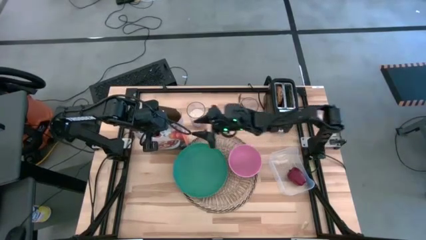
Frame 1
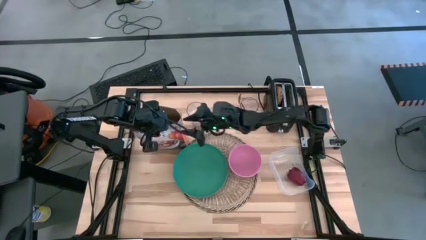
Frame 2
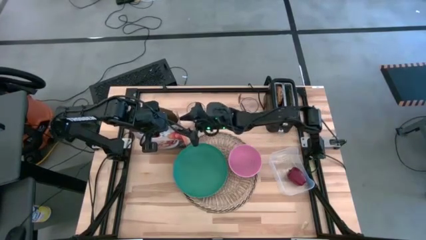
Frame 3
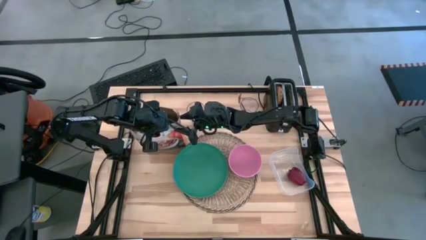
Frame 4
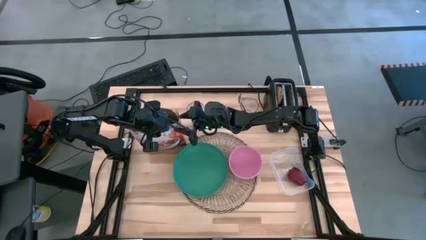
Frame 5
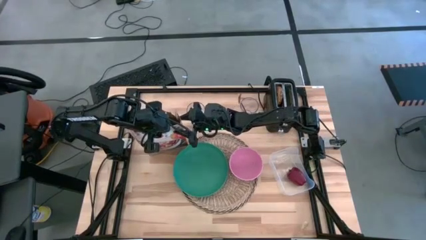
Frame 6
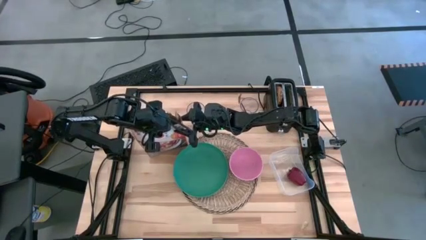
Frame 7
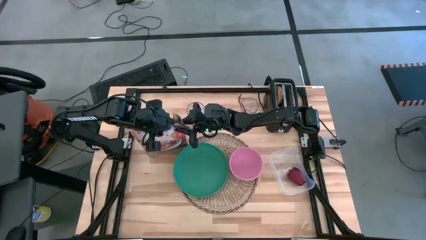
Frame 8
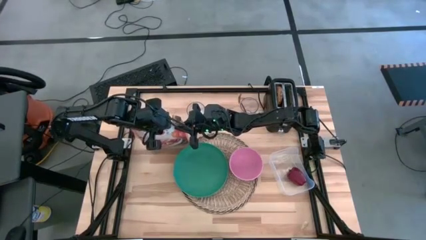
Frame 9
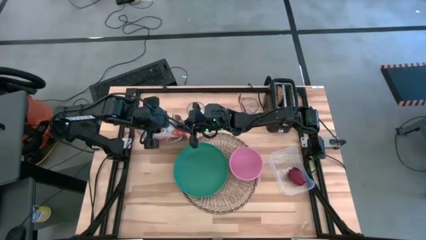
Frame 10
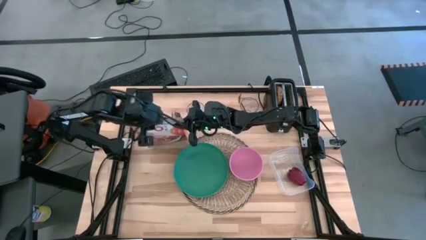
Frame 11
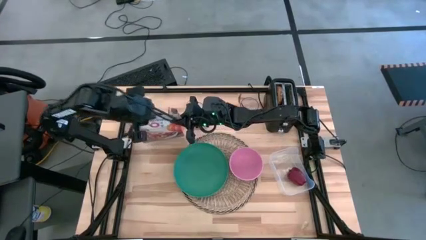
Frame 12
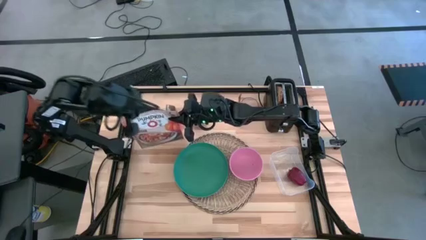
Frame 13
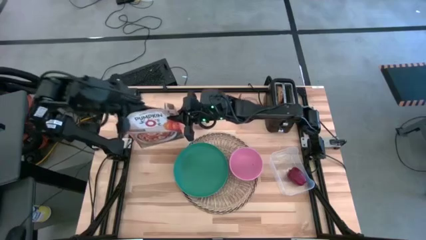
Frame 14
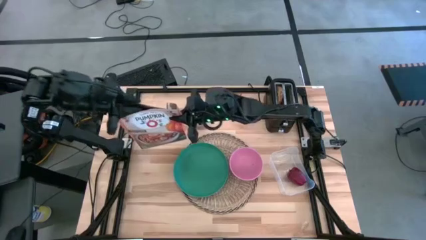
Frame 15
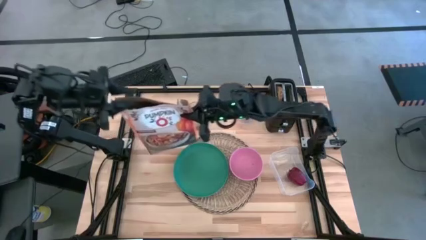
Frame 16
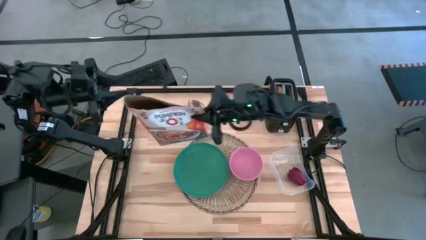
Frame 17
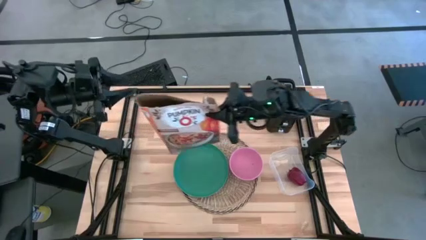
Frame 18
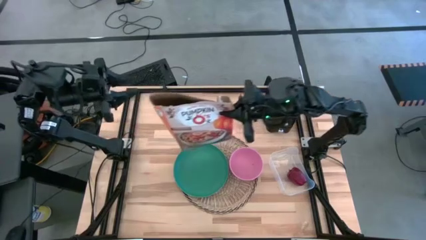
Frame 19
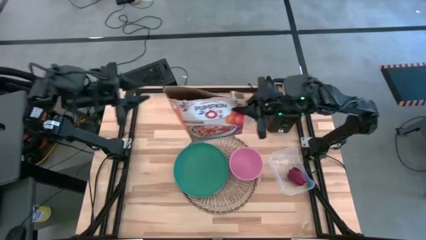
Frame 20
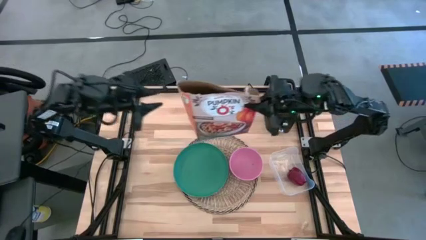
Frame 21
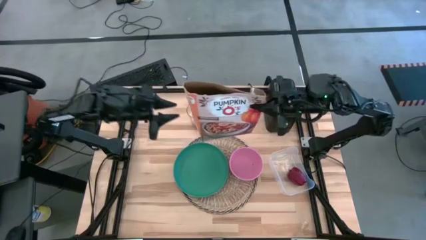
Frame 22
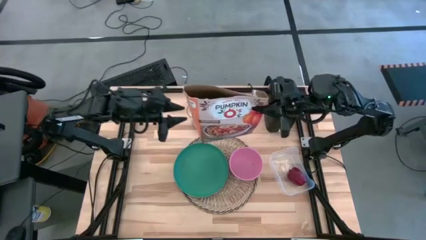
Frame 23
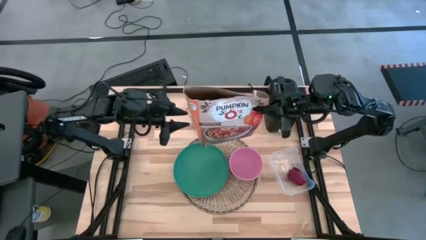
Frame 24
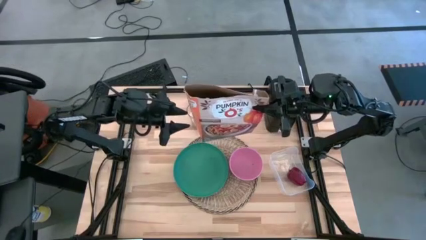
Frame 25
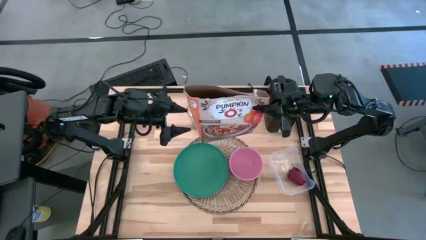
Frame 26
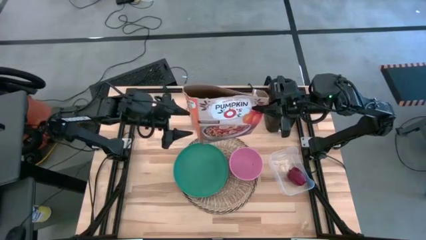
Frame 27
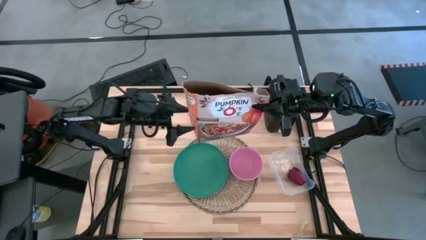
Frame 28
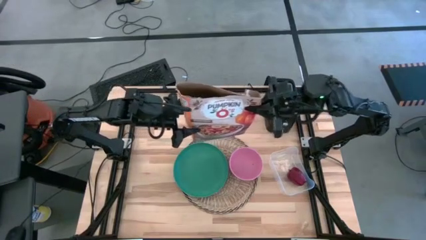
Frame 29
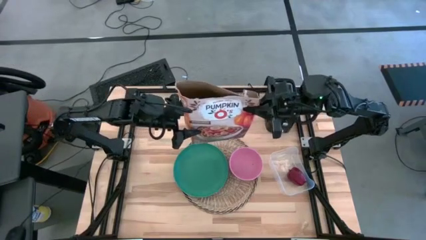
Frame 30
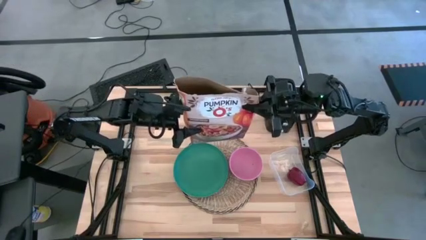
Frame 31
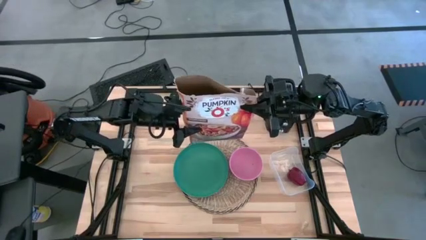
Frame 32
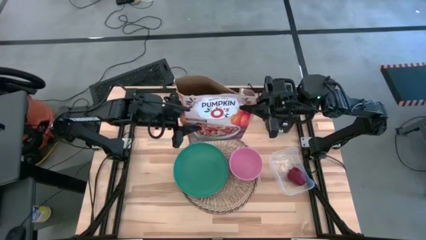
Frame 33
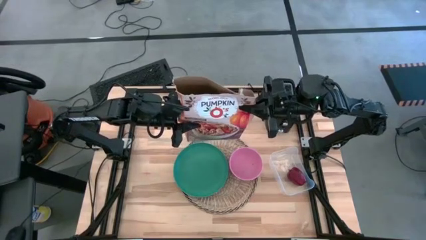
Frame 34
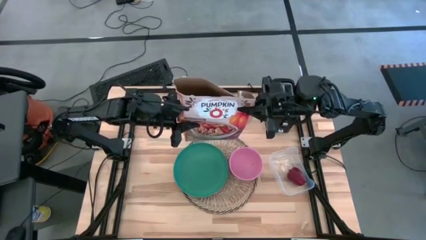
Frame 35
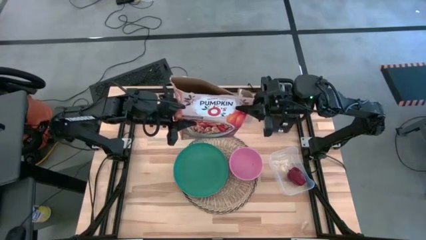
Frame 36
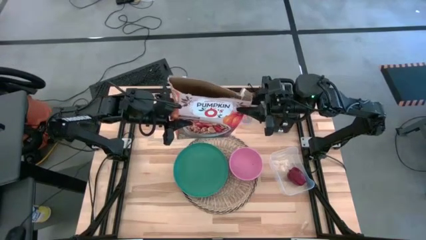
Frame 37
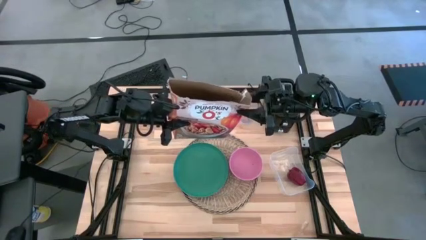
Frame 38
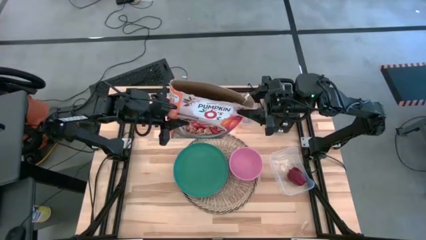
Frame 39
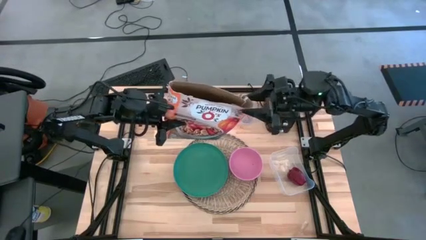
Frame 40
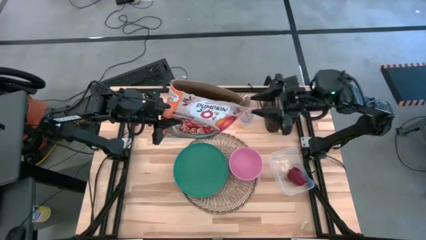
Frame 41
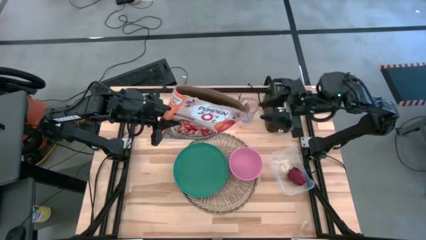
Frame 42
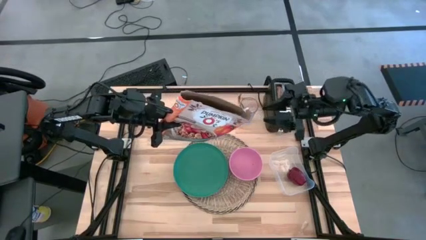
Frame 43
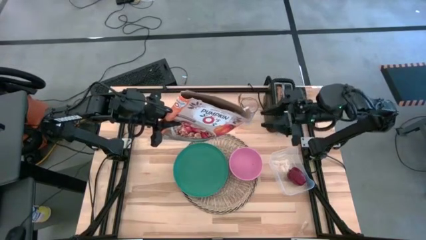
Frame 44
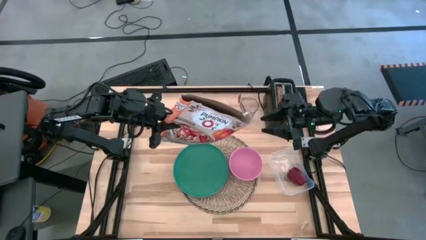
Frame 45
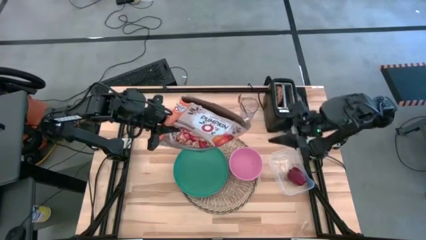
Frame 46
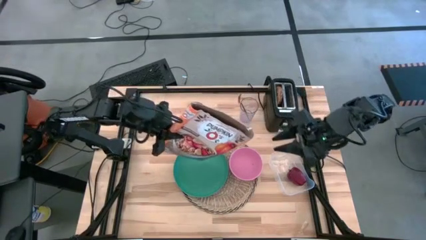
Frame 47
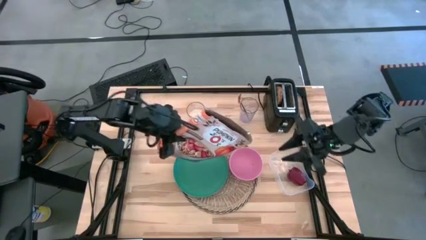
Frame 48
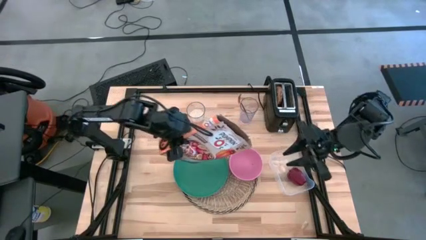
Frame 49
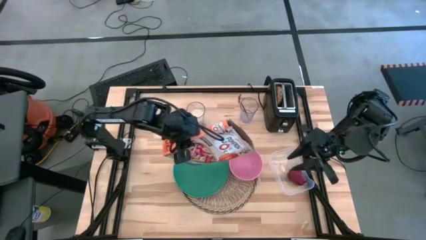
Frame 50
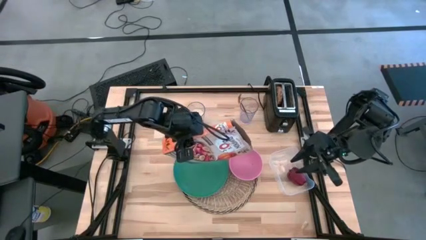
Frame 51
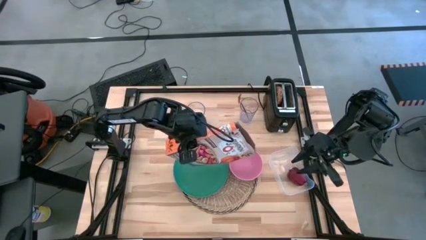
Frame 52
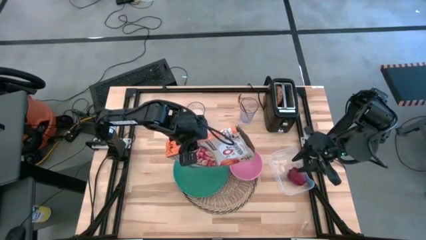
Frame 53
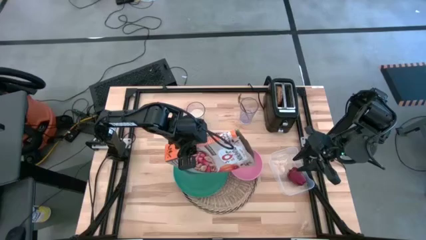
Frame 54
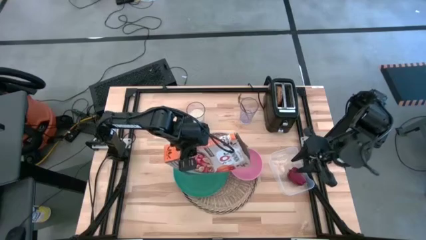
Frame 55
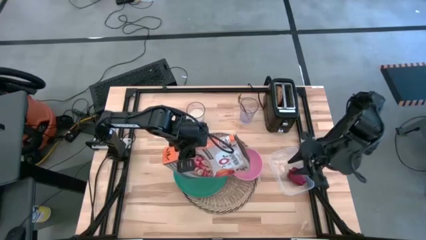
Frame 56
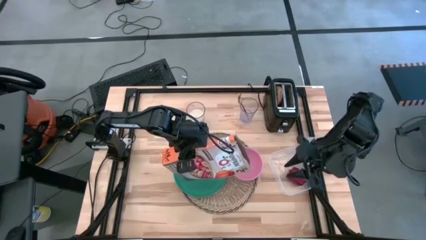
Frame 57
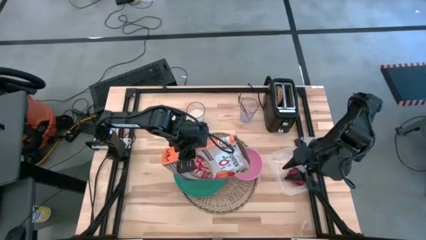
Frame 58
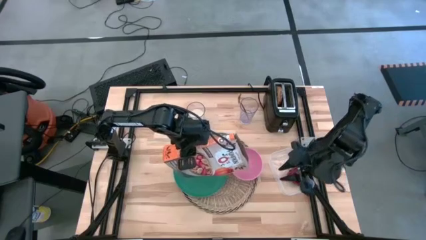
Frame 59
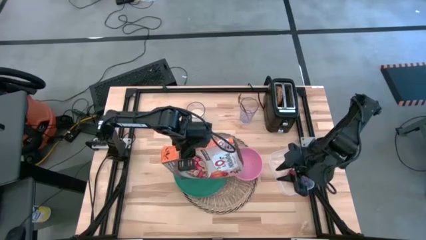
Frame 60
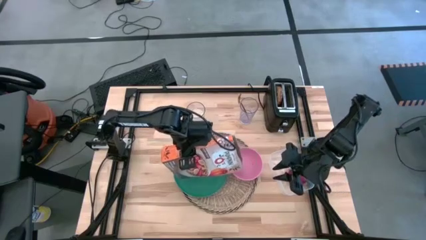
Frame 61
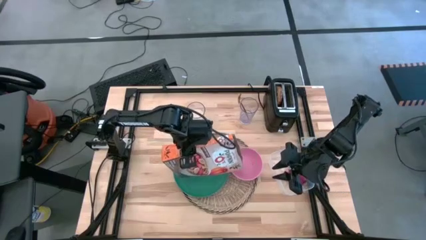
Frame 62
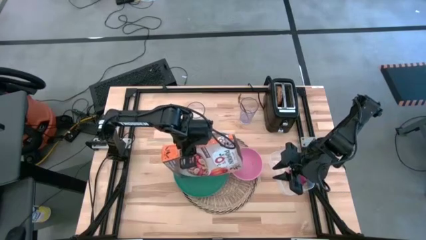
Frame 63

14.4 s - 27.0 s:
Task: Arrange a breakfast setting
Pour the cereals from the box into the pink bowl
